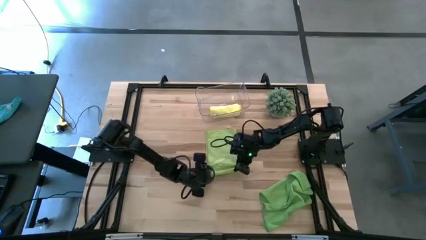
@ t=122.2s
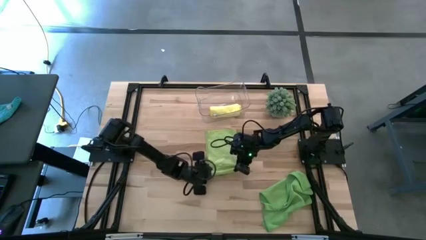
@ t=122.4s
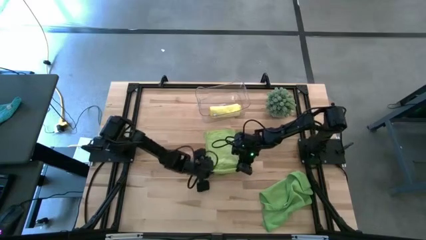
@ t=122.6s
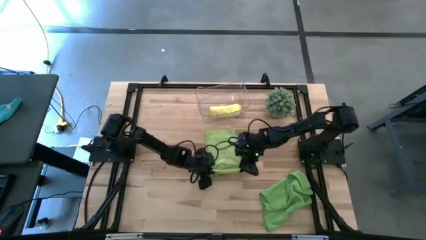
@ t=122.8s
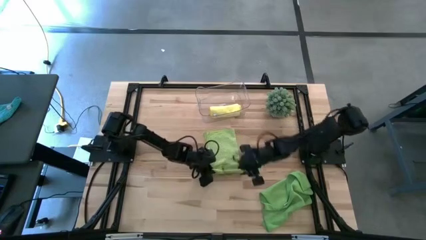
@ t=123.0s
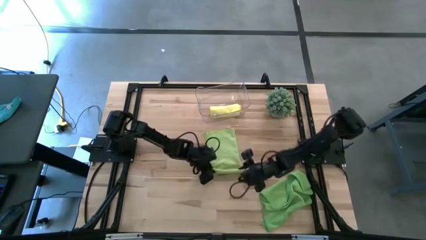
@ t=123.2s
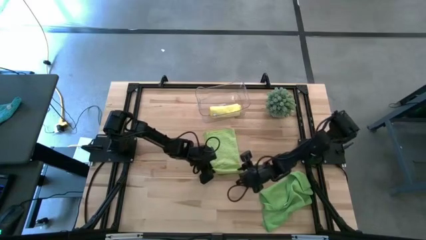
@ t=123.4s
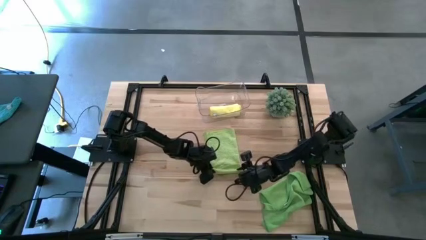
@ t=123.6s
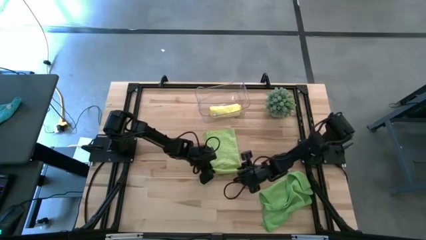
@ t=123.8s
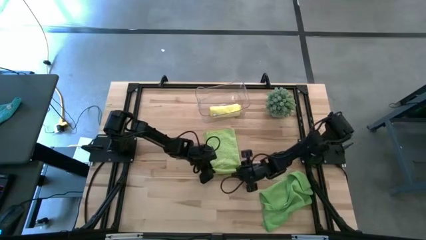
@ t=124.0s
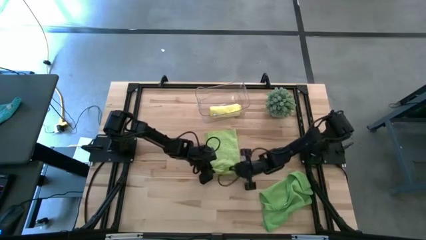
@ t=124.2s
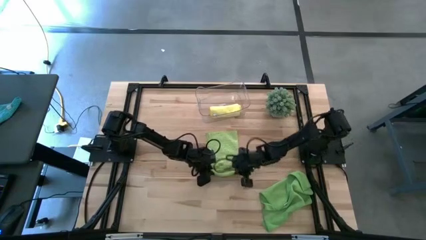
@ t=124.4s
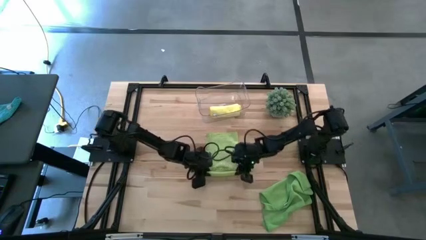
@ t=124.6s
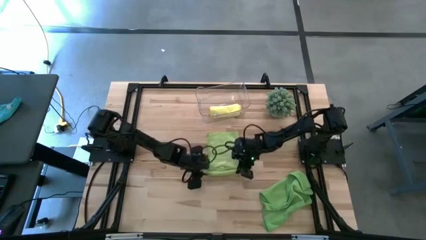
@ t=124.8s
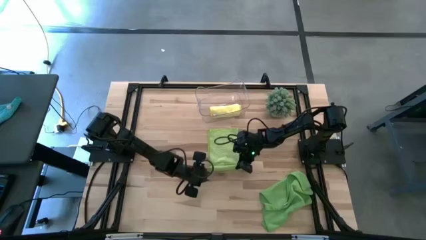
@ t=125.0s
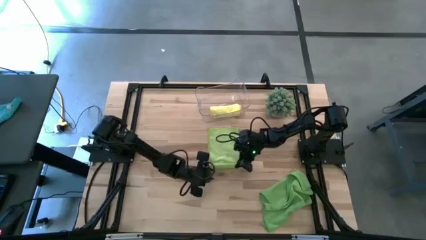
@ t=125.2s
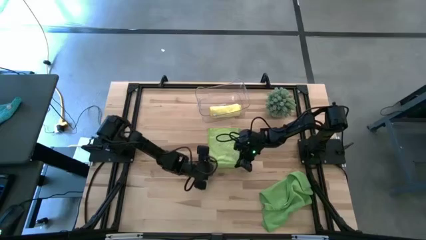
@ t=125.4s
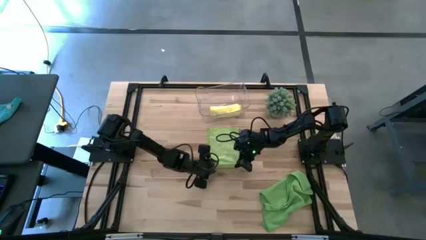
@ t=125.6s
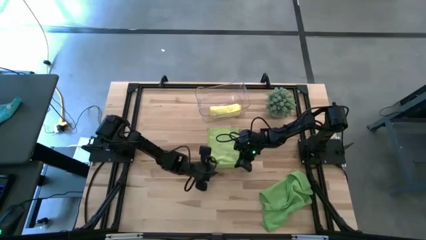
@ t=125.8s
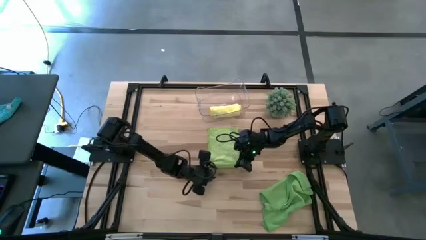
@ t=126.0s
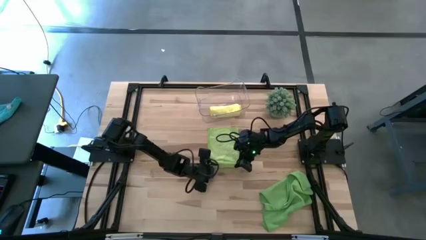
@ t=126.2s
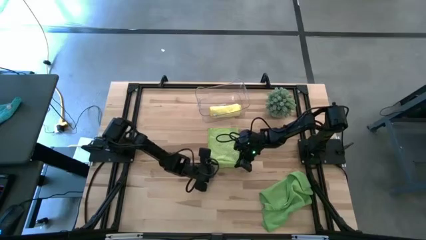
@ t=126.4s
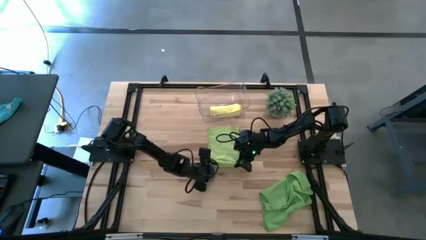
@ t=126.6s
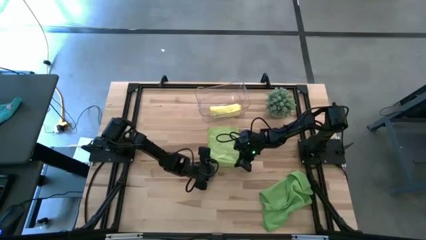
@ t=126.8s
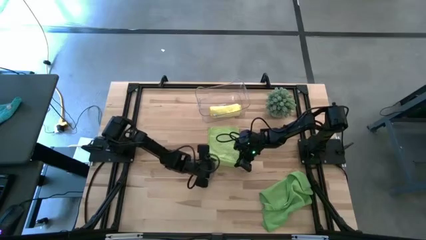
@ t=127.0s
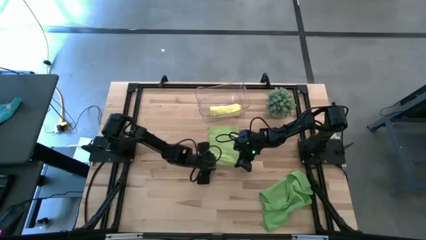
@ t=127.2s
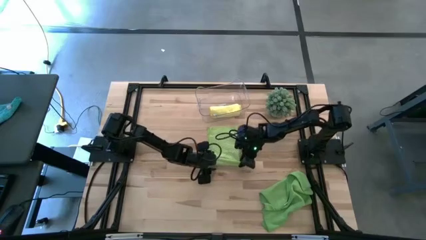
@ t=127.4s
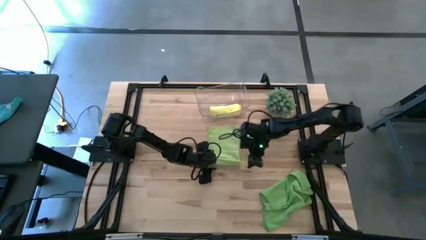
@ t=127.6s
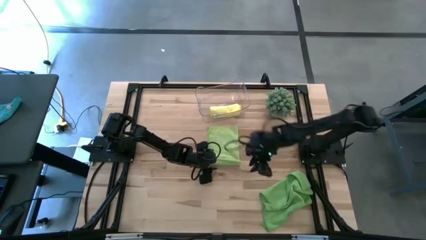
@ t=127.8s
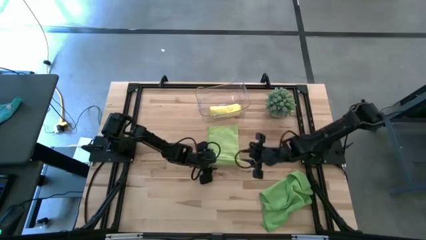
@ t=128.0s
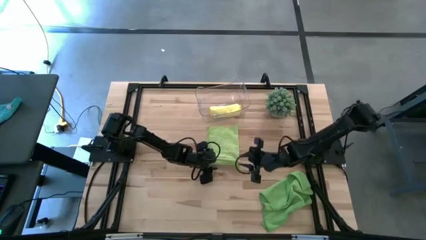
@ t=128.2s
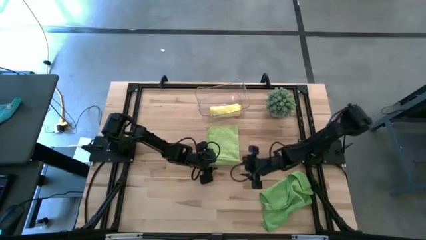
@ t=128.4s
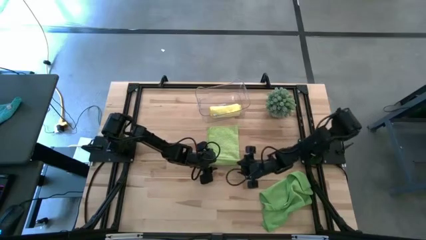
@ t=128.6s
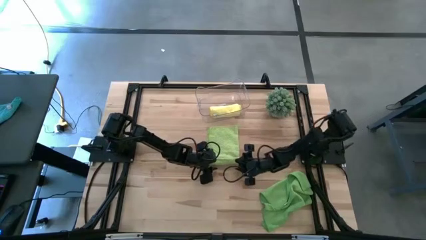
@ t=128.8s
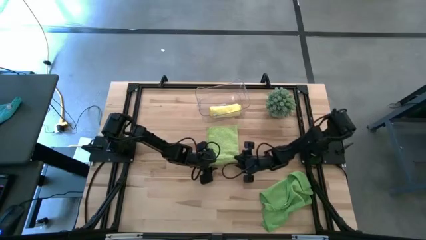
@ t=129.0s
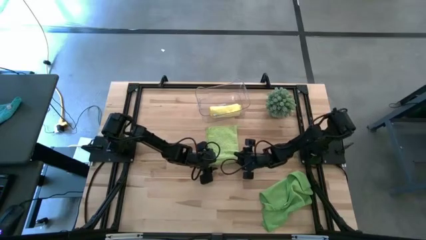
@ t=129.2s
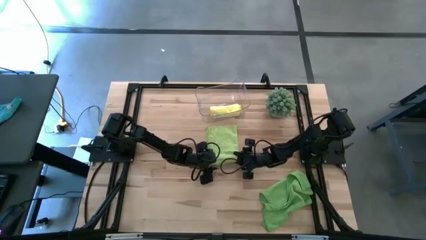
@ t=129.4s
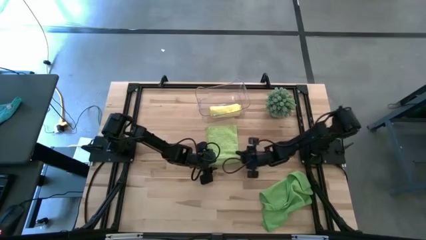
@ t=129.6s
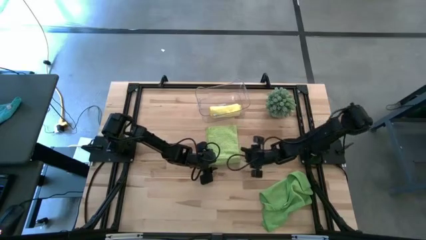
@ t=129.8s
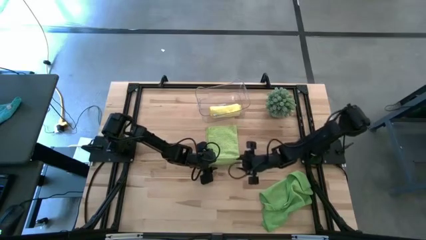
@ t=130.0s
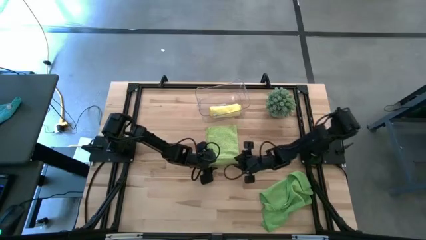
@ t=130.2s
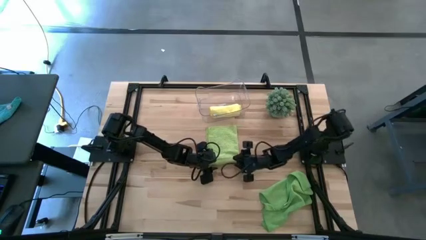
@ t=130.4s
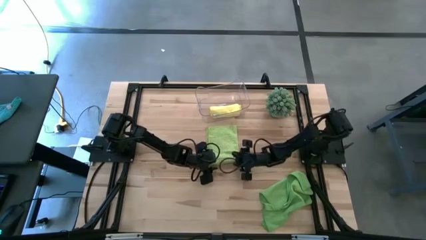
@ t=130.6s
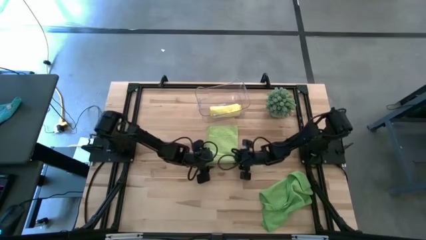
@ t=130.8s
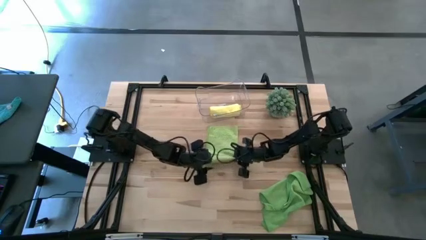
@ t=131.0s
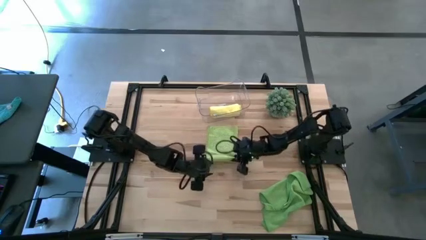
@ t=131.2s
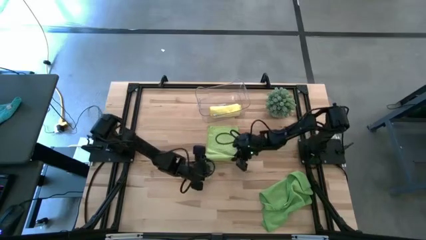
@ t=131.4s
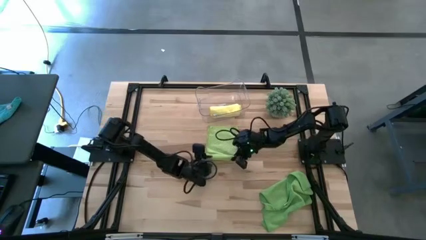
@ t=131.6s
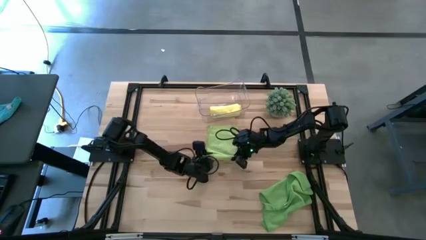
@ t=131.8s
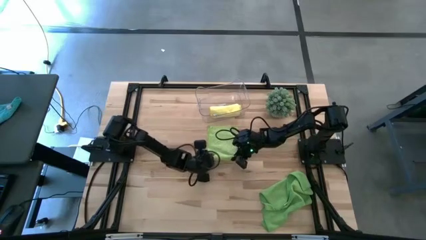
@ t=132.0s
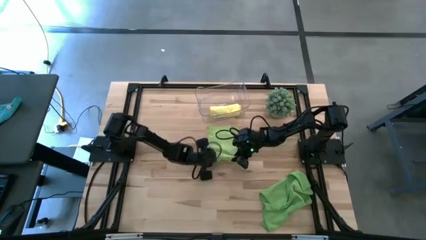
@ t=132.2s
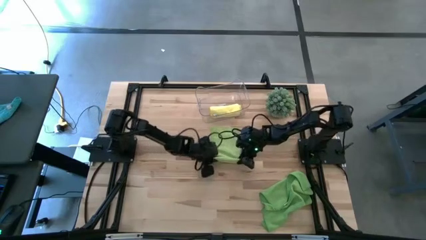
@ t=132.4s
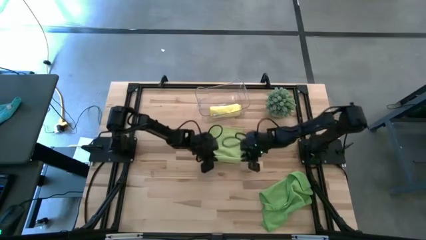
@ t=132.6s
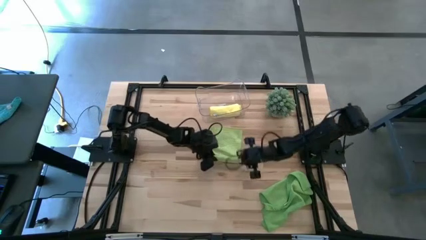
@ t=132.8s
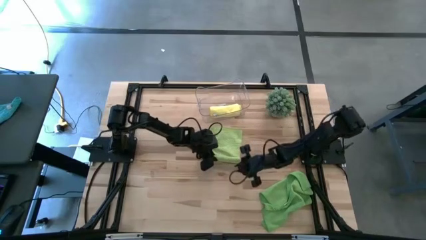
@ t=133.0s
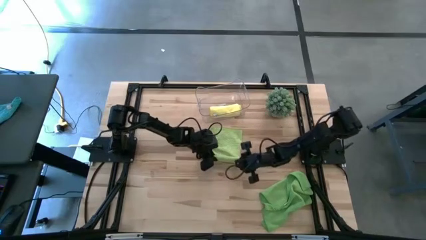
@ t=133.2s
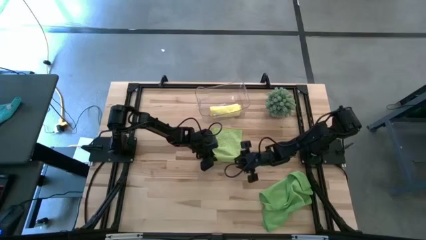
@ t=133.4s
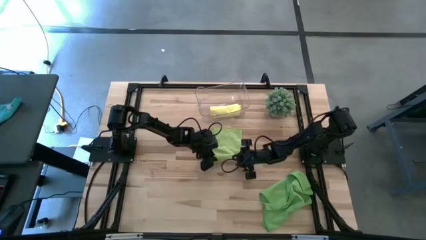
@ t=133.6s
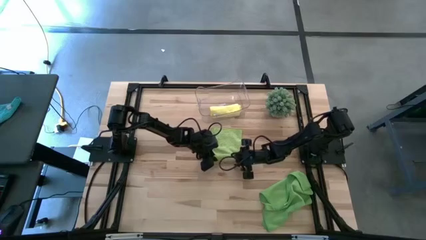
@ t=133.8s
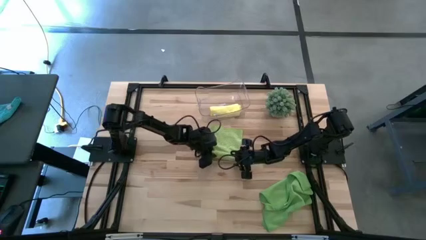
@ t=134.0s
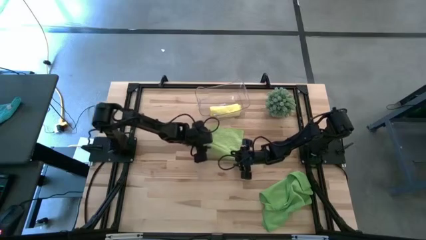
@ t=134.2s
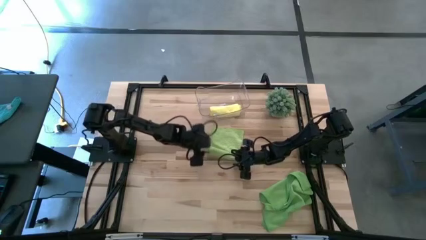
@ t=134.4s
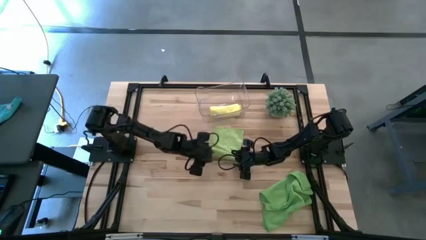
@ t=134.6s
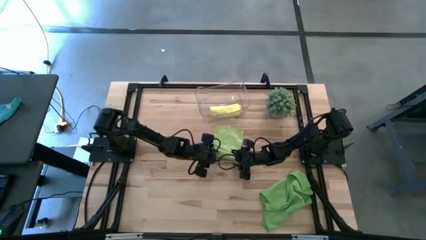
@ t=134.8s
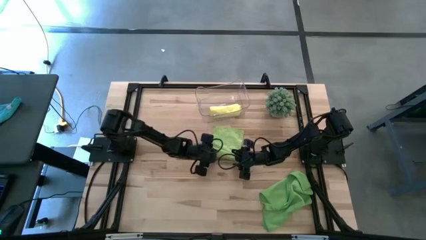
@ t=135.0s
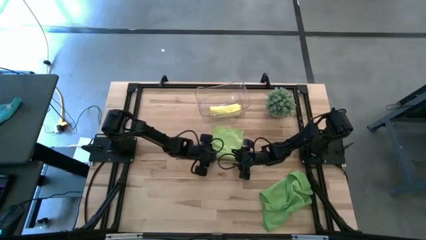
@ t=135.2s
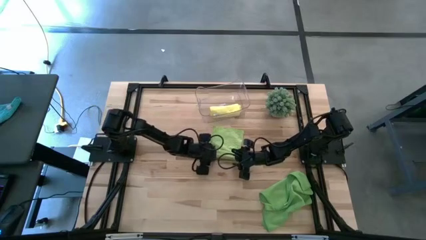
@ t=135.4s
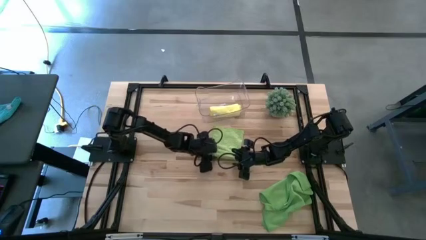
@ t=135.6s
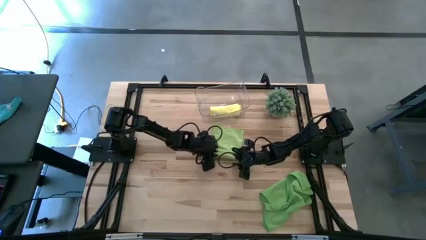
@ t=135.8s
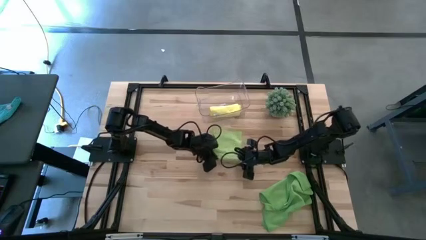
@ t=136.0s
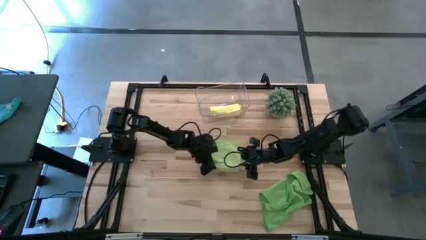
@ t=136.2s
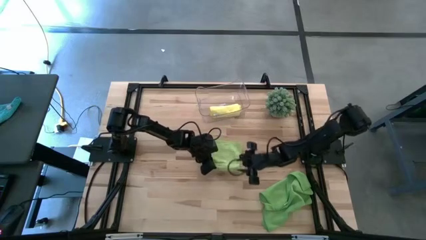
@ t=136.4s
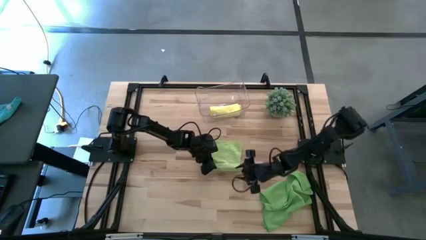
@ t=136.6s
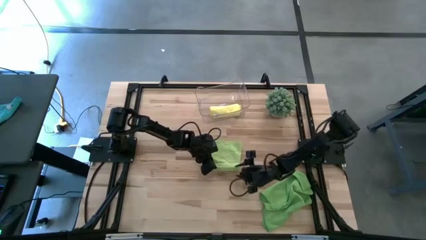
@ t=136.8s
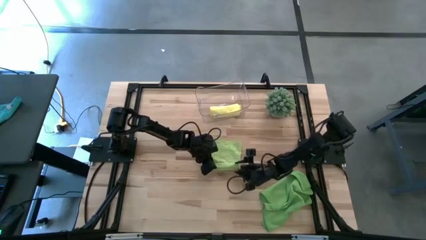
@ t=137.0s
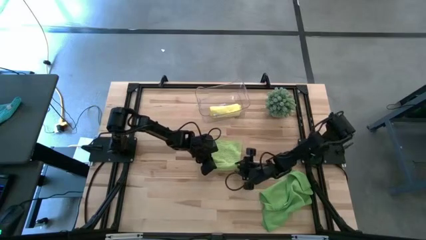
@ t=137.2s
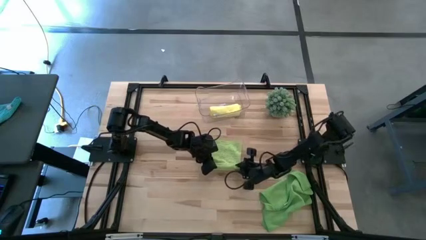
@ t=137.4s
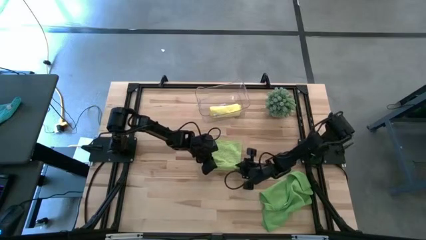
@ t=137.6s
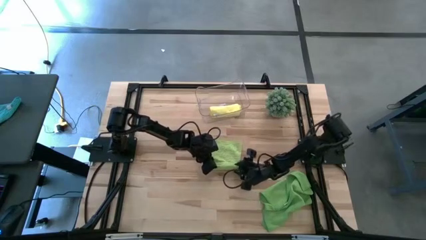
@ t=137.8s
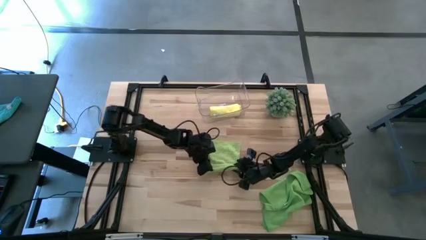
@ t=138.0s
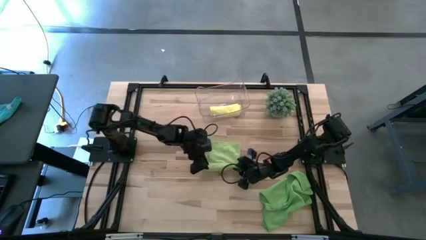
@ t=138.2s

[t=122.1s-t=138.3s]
Task: Roll microfiber towels into tight, uniform cylinder then place into a basket
Roll the light green microfiber towel
